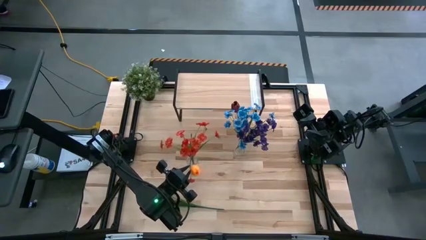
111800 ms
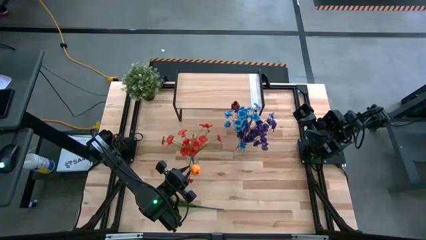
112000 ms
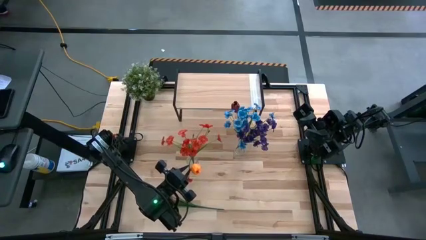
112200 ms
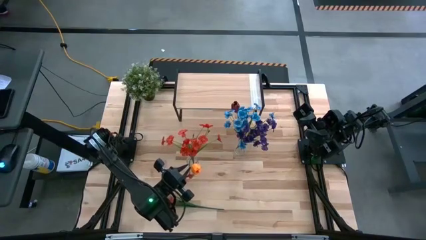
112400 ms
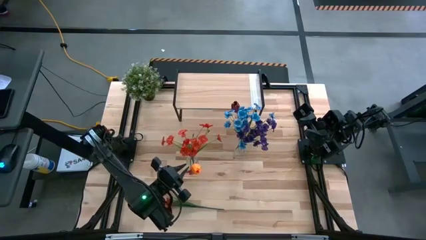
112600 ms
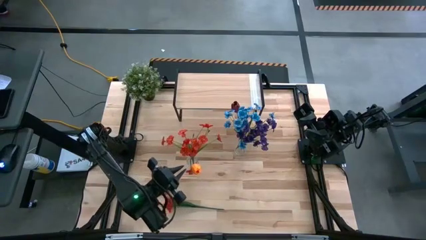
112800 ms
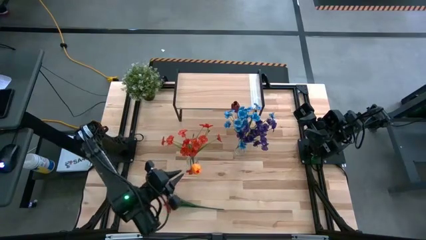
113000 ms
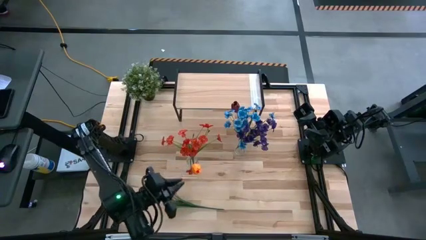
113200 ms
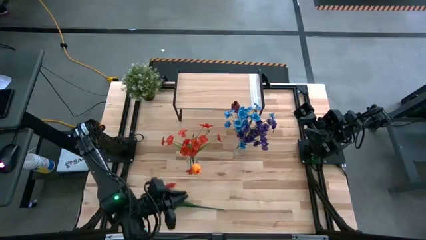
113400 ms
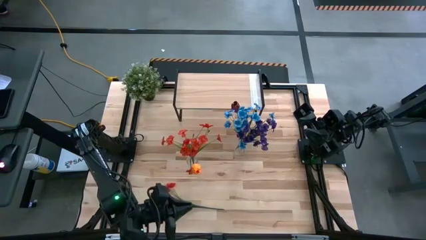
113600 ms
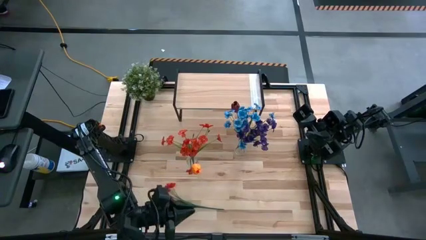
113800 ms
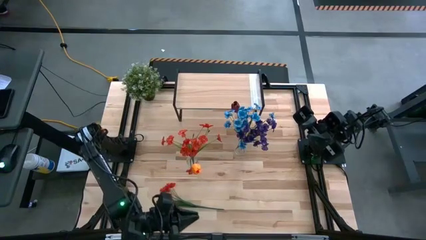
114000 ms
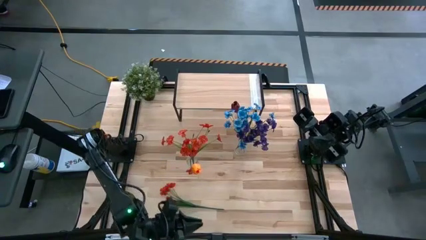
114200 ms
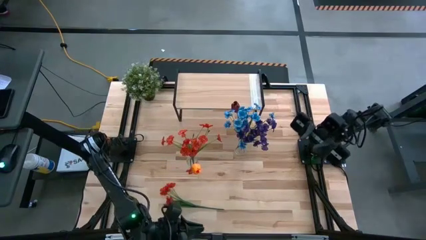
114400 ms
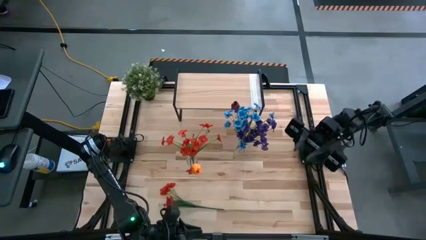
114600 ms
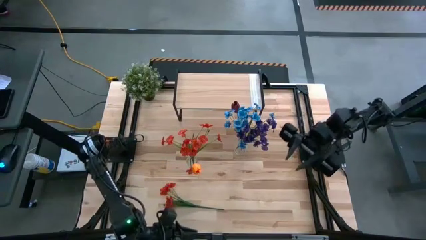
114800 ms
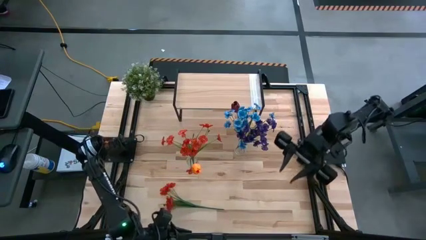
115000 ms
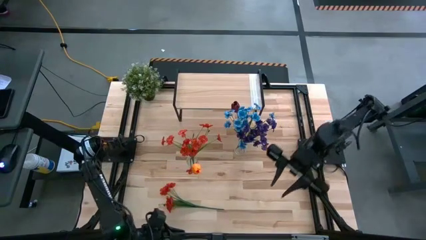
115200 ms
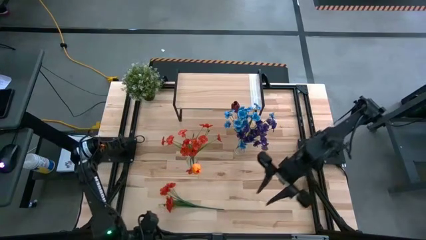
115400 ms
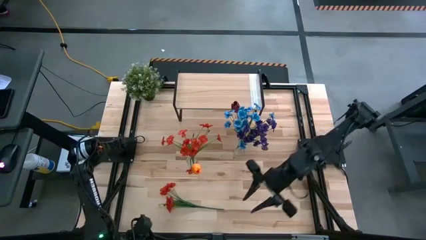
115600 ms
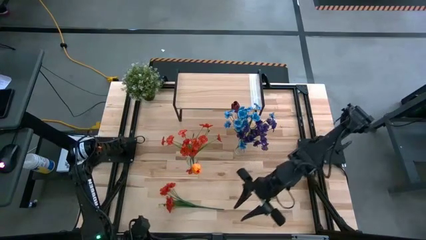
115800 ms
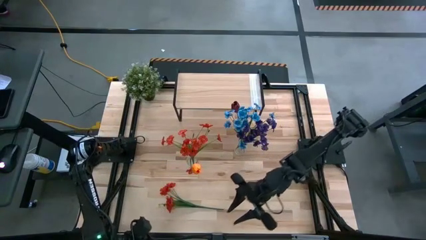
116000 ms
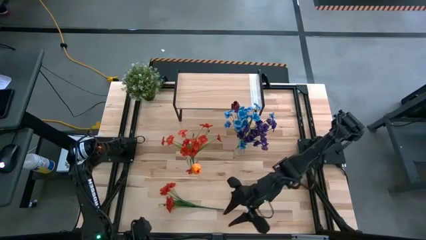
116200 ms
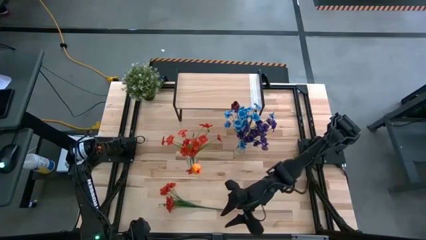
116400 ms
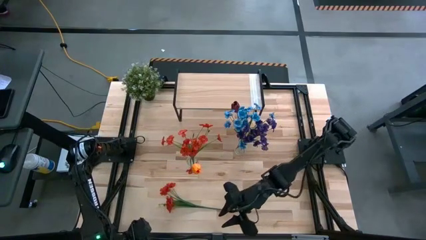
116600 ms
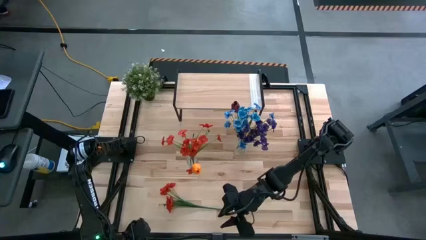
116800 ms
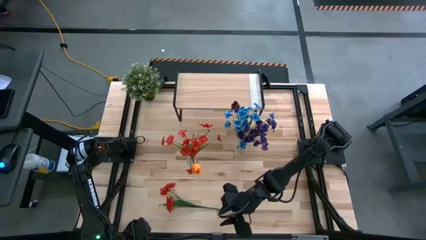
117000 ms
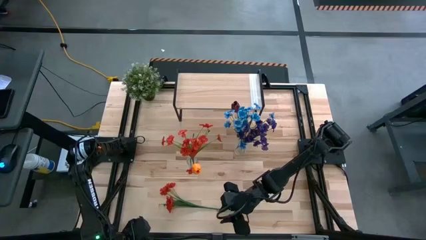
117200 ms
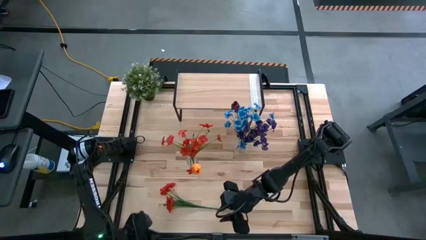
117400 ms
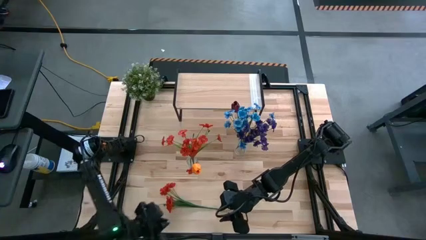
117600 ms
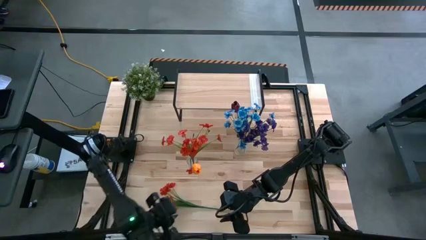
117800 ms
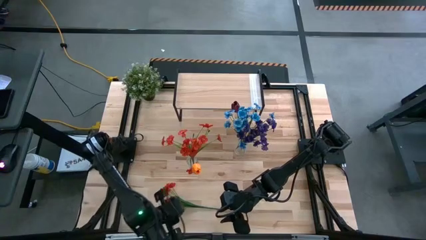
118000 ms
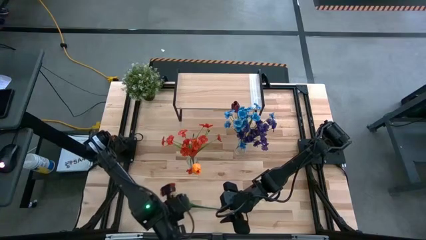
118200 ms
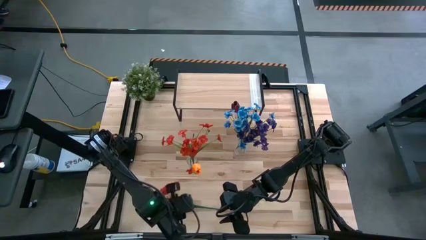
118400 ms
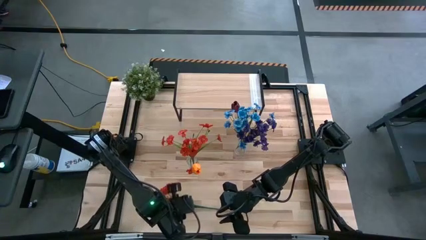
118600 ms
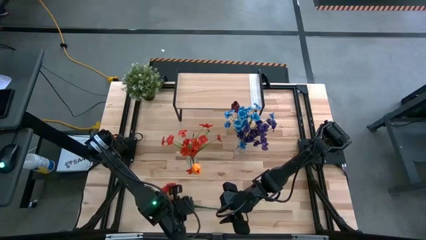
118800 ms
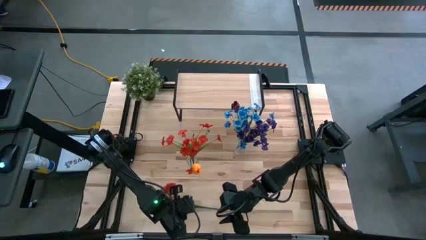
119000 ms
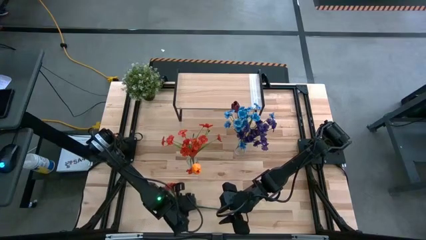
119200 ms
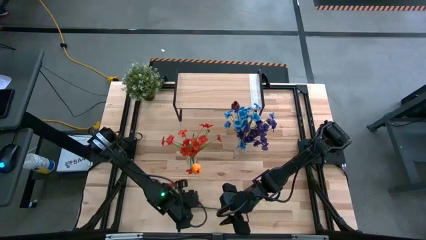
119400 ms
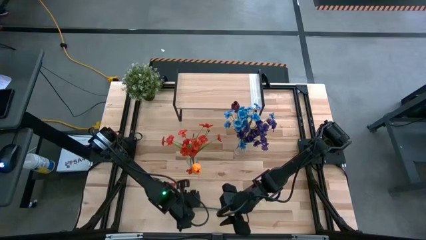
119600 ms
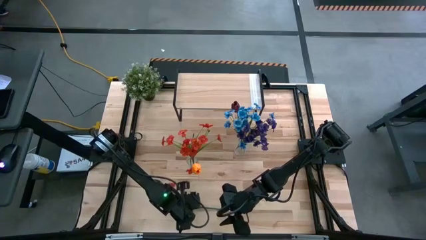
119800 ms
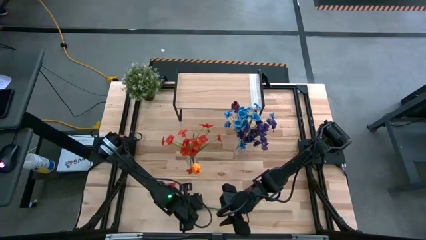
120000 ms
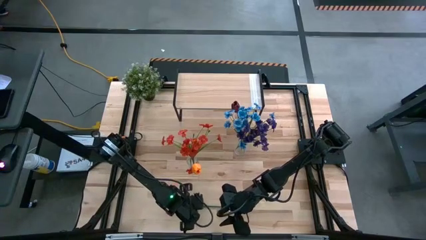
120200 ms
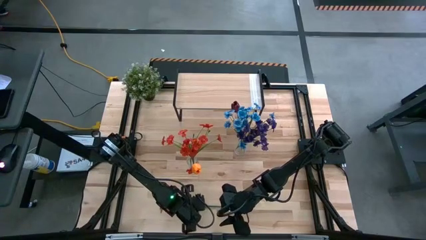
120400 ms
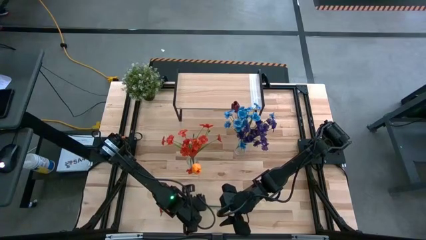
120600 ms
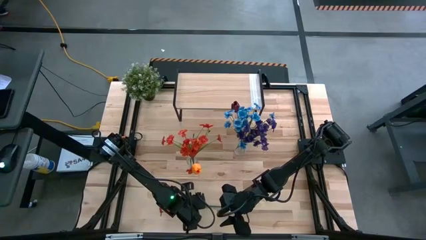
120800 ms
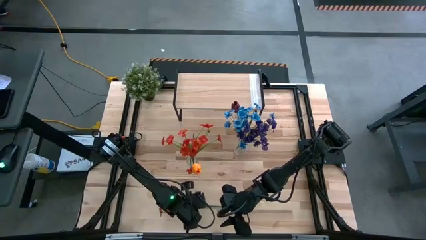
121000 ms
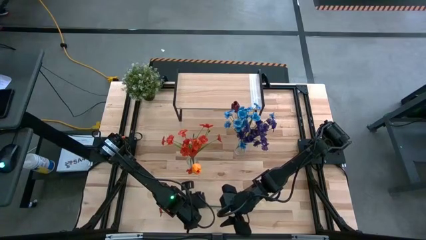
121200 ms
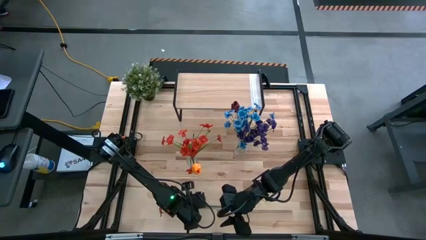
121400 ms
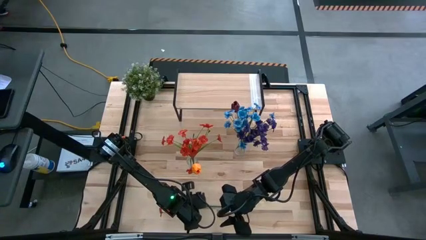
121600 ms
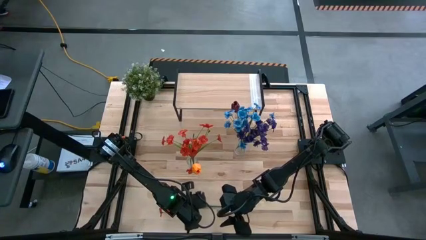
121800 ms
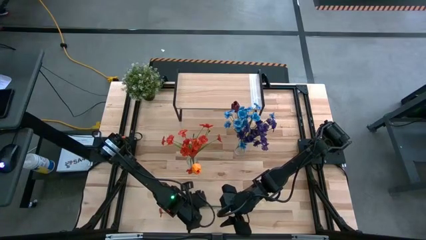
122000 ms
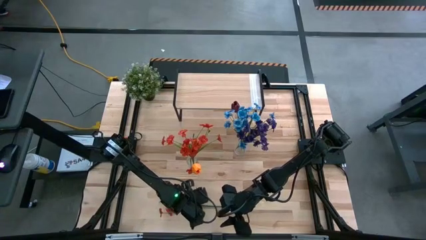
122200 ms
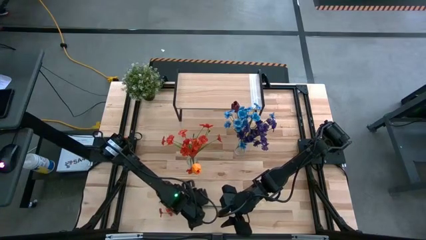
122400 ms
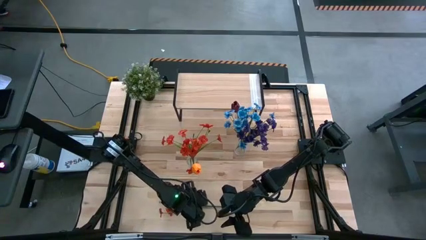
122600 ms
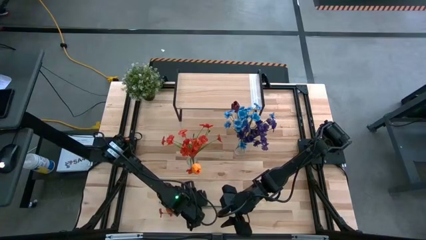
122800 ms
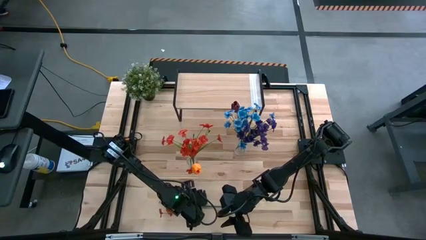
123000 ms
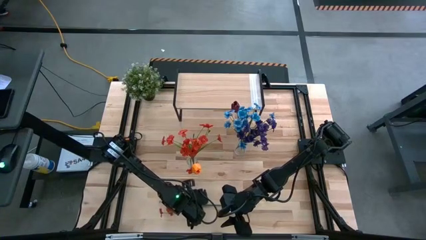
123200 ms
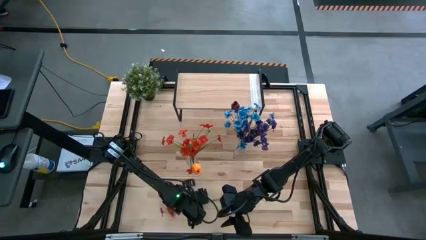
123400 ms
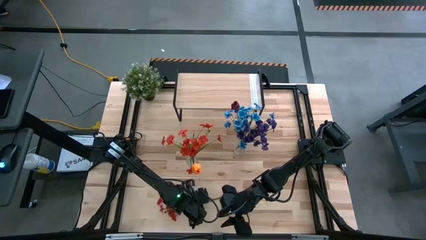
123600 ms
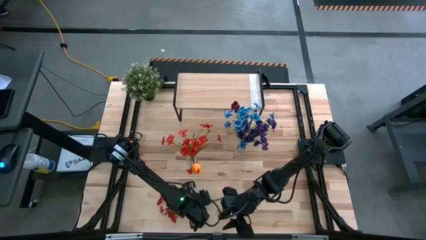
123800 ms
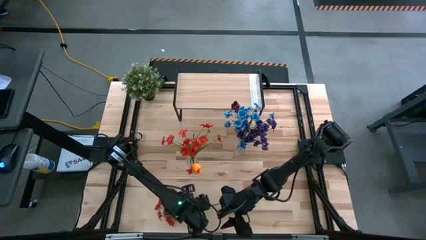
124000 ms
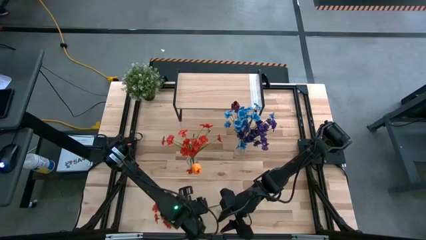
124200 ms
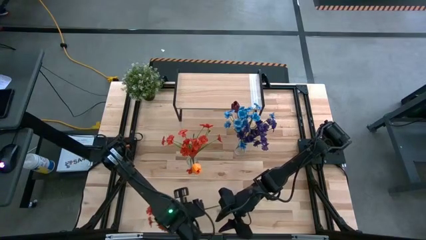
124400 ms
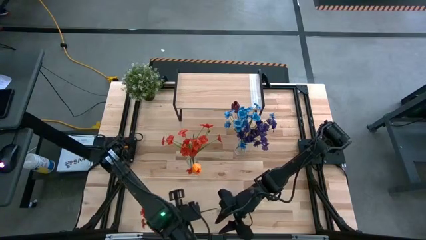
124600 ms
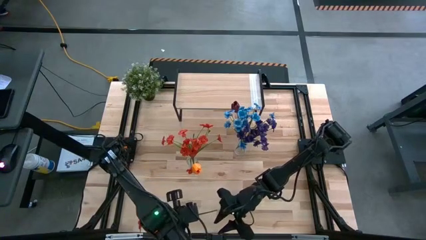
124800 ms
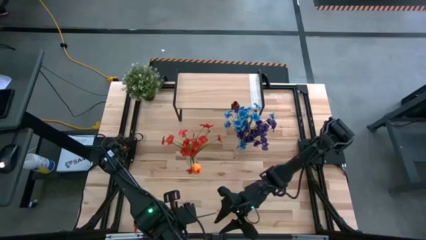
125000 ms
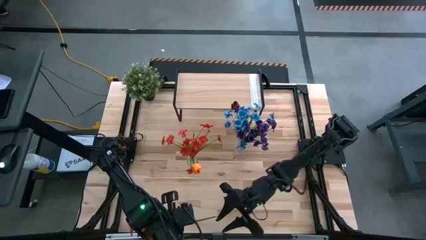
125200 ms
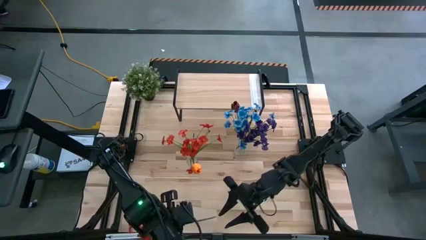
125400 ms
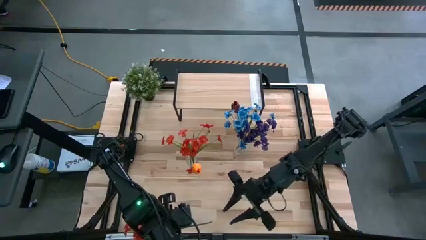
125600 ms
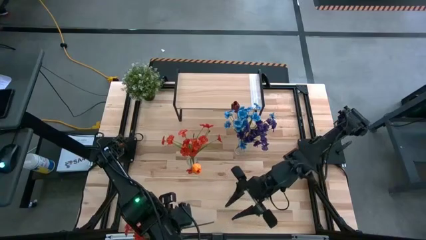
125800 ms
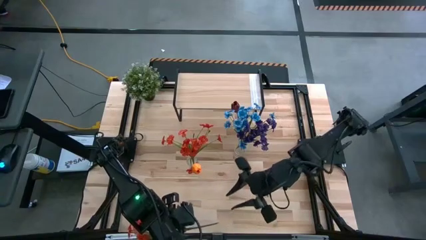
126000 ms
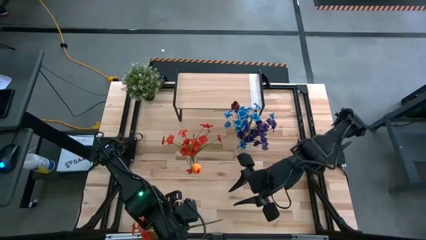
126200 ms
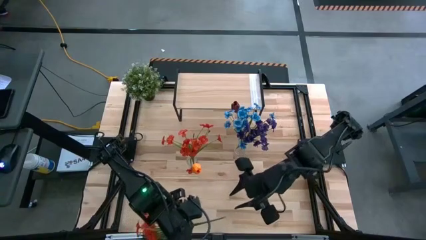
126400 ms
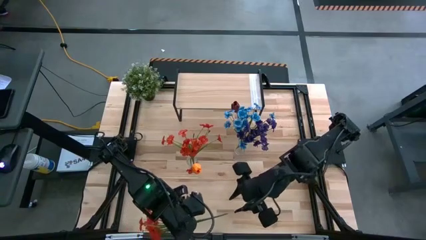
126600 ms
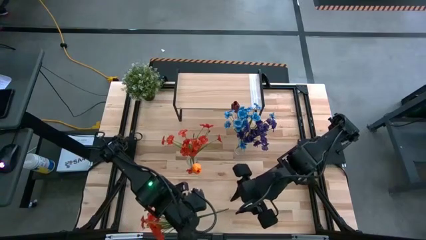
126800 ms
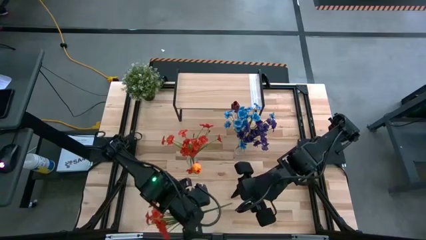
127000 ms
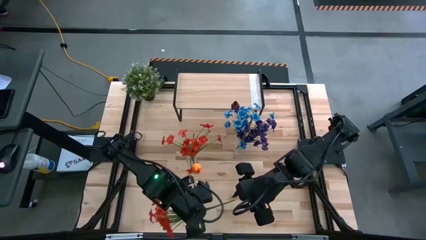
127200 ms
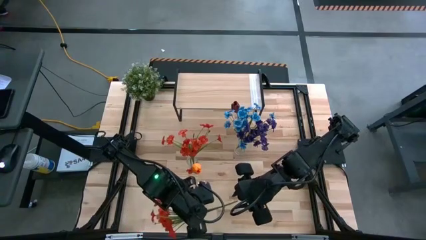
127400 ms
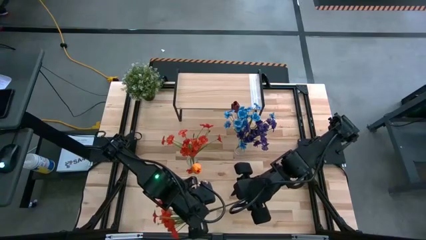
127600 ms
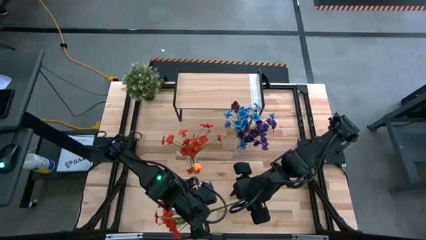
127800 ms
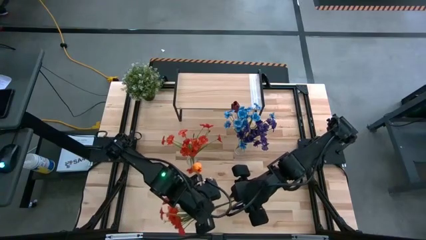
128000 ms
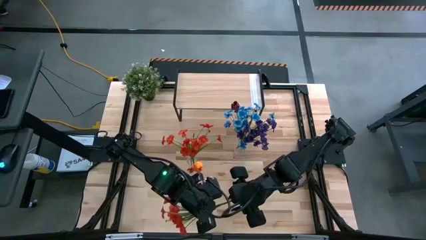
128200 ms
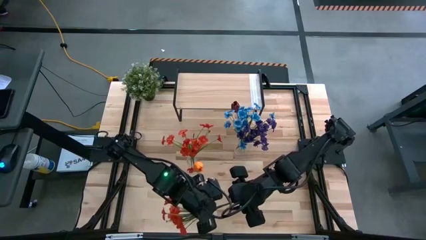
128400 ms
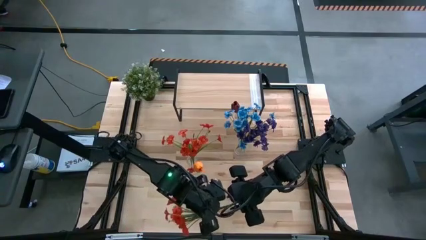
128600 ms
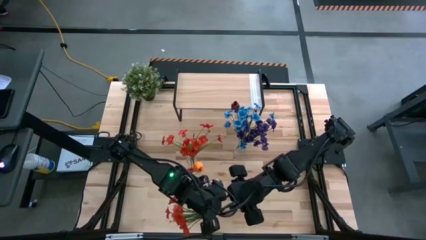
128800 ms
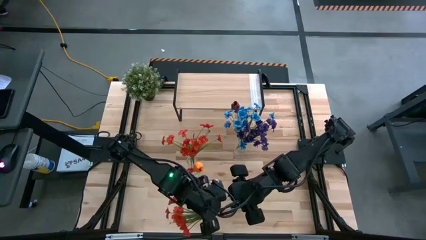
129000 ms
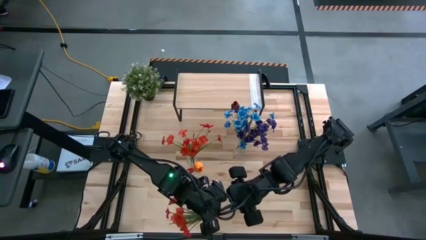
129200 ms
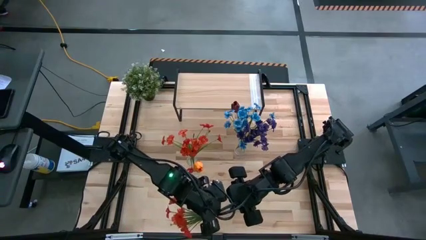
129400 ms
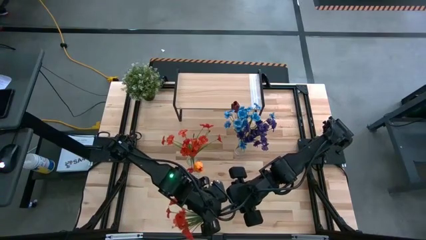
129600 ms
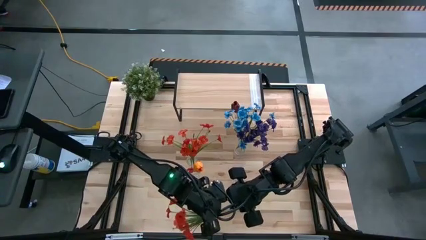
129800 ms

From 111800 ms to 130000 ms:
Task: Pick and place flowers into a vace then onto a shelf
Put the red flower into the left transparent vase
